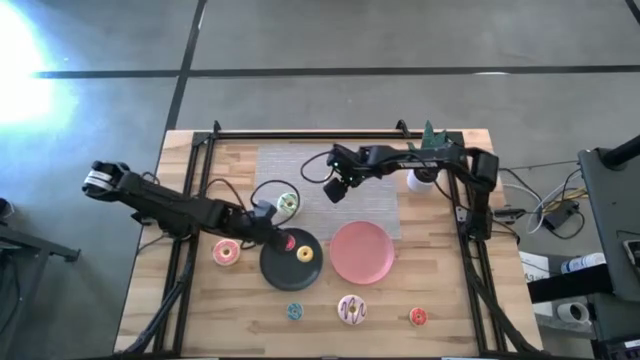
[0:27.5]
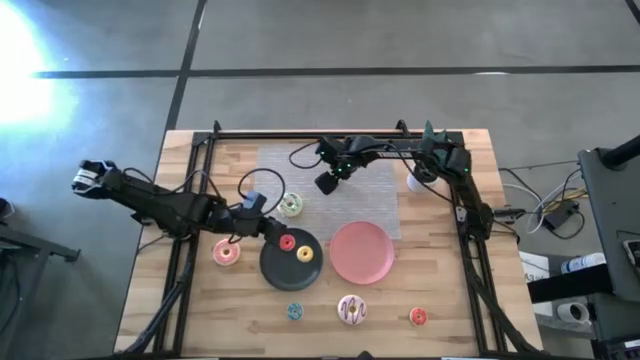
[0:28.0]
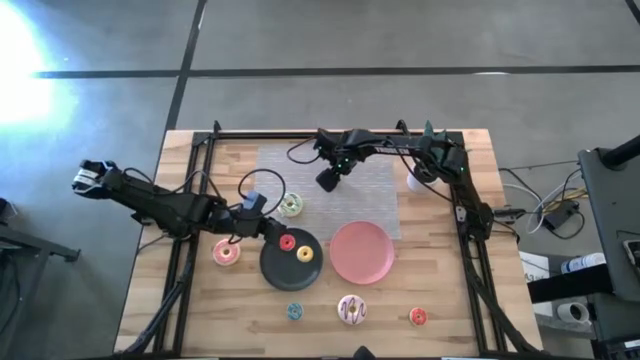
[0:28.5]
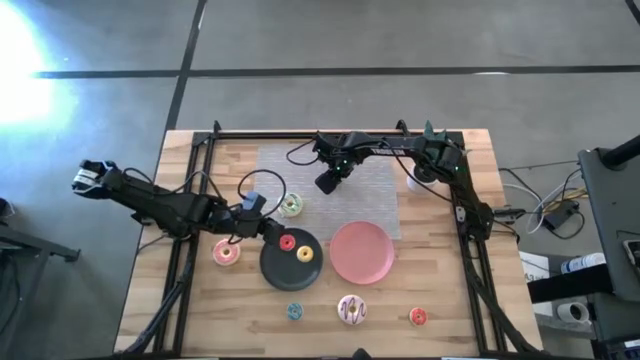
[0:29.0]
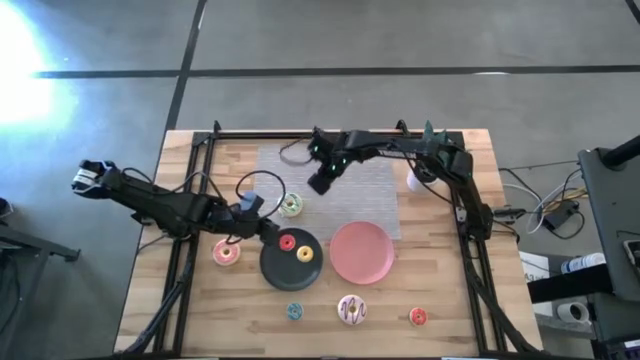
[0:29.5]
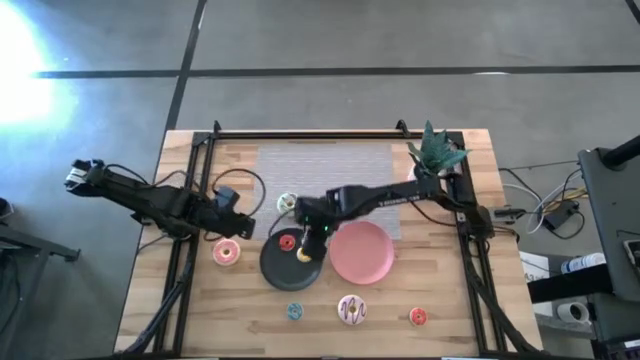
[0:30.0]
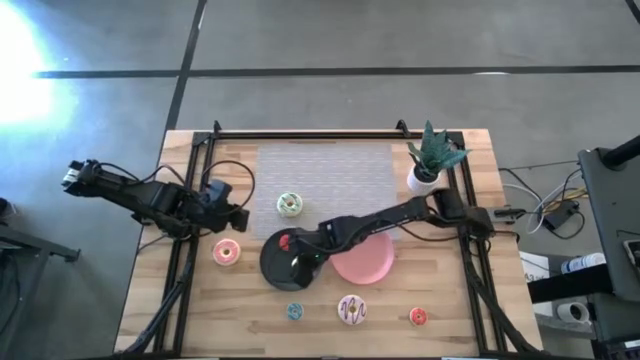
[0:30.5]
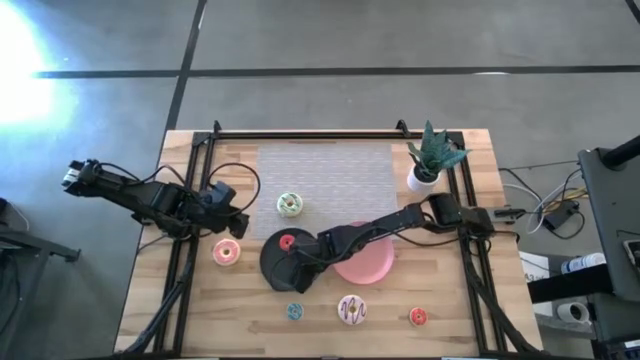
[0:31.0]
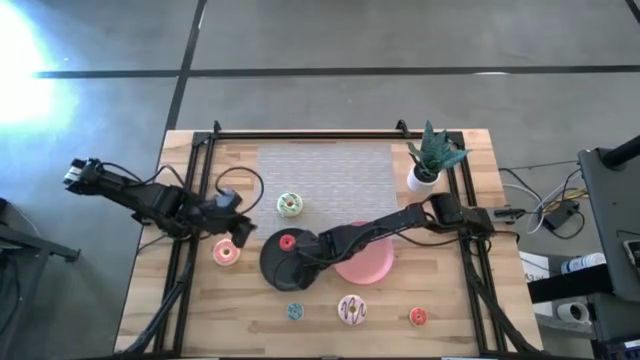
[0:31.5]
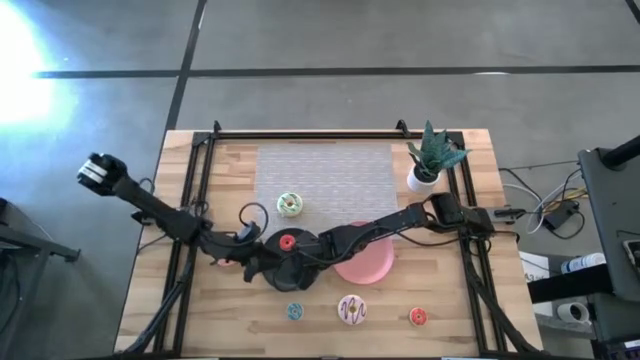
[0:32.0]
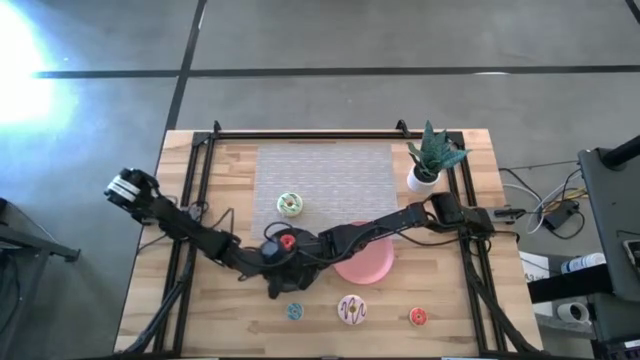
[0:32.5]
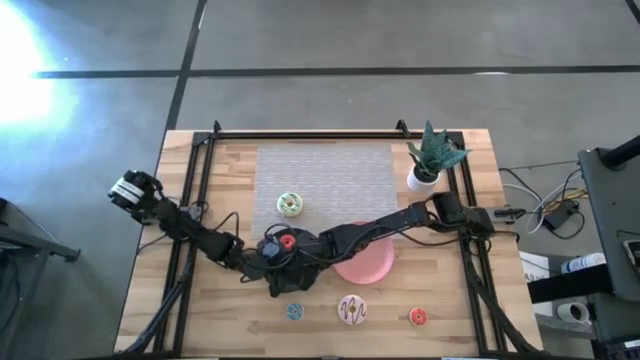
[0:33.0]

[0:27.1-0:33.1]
Task: Pick & Place donuts
Put the small white doughnut on the black plate

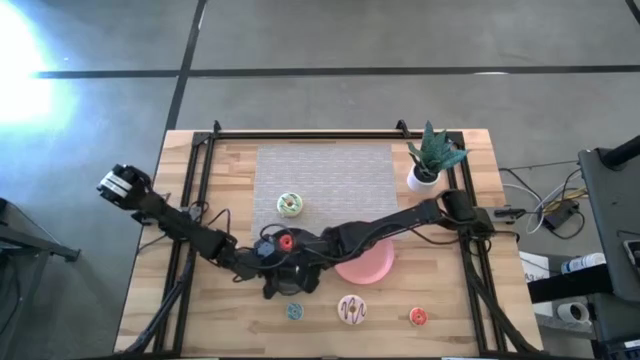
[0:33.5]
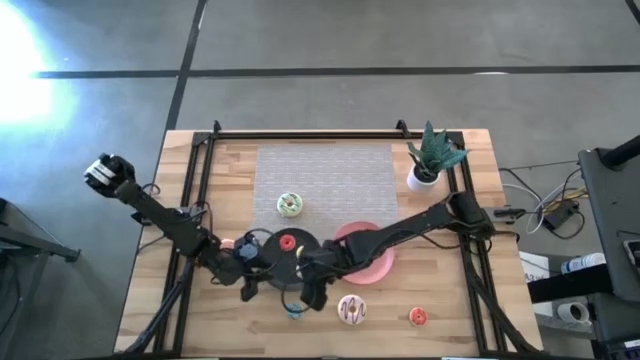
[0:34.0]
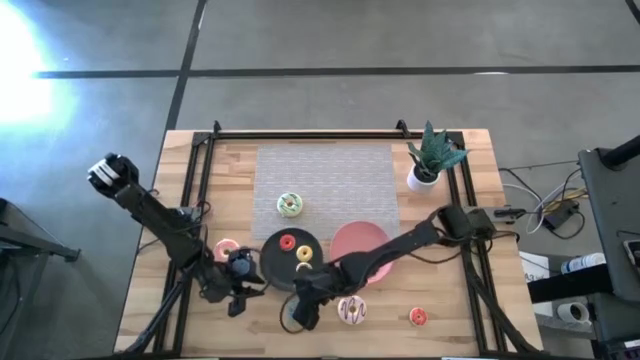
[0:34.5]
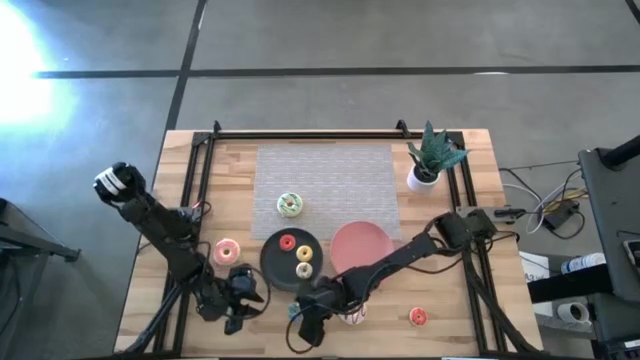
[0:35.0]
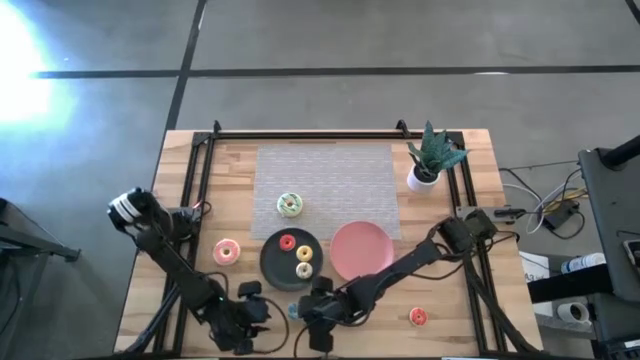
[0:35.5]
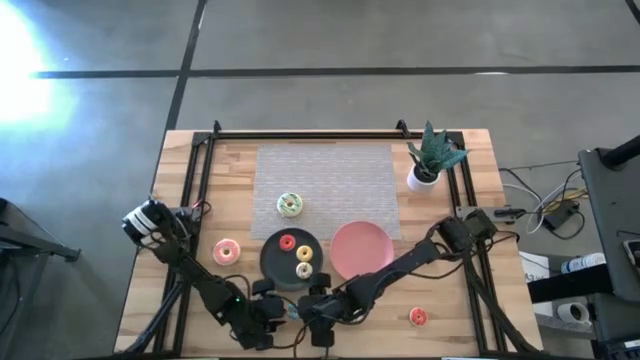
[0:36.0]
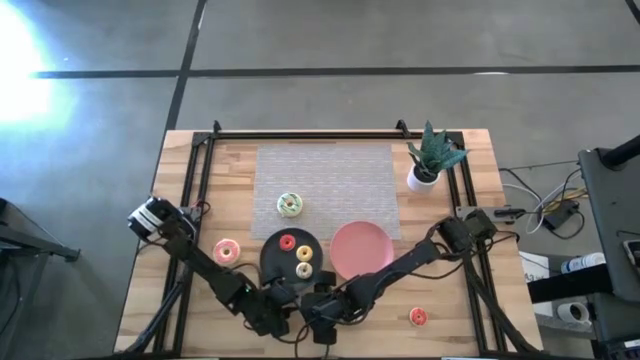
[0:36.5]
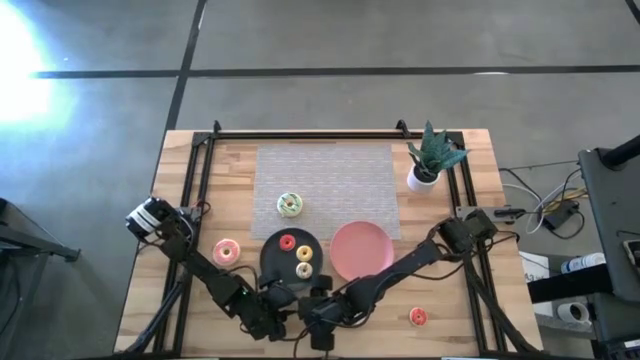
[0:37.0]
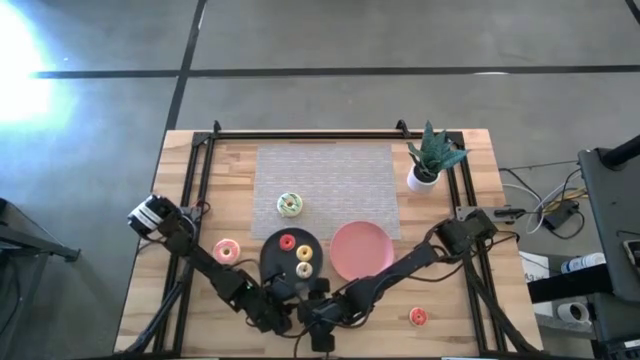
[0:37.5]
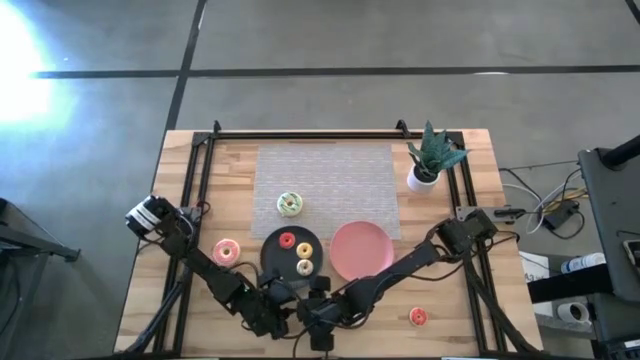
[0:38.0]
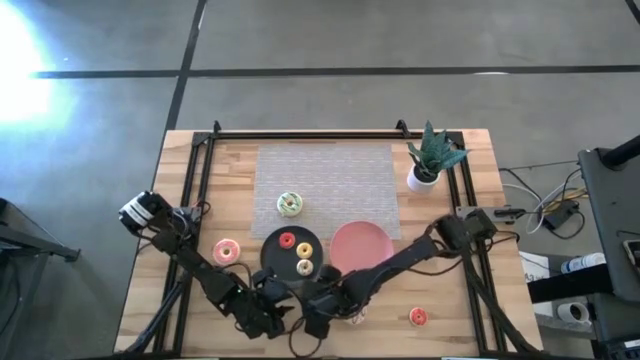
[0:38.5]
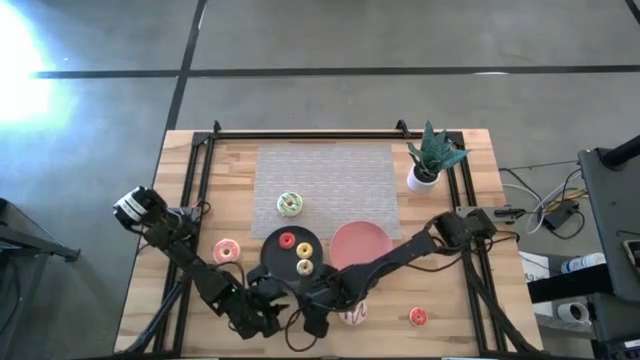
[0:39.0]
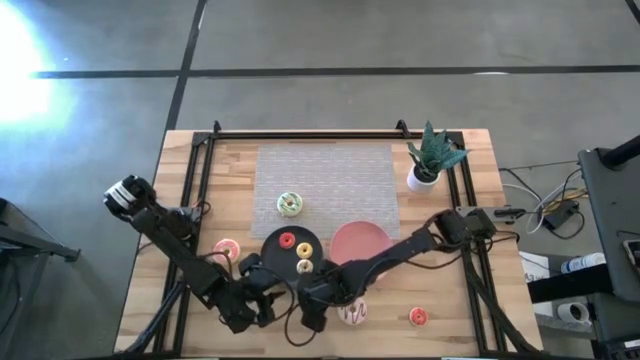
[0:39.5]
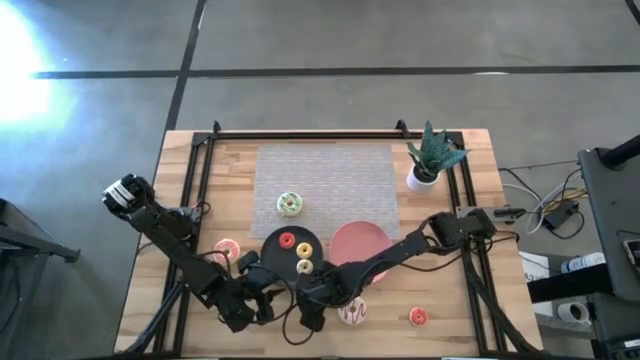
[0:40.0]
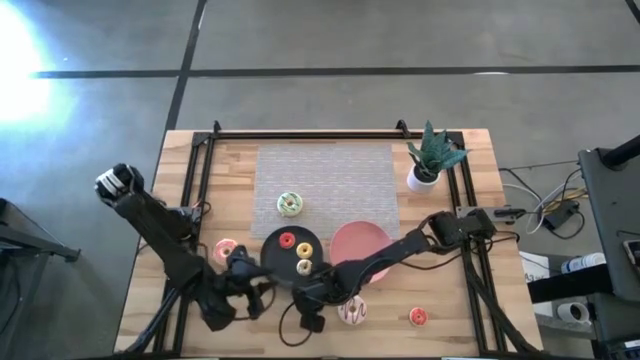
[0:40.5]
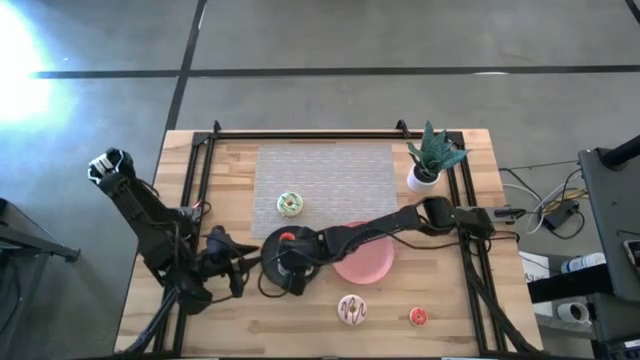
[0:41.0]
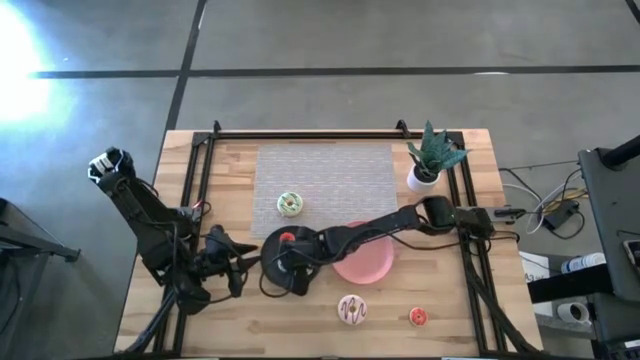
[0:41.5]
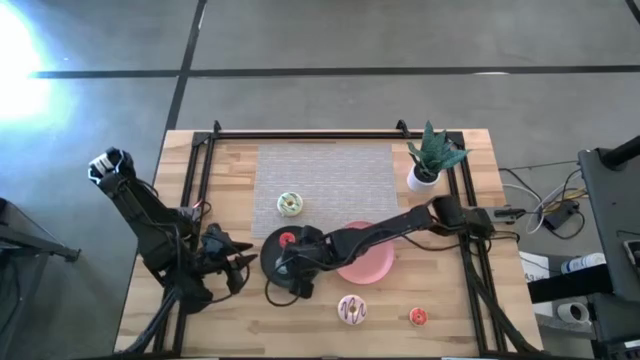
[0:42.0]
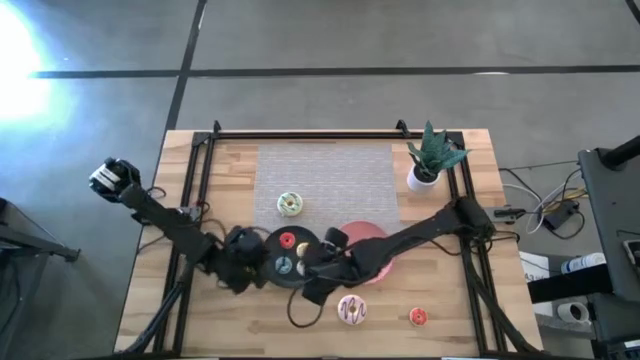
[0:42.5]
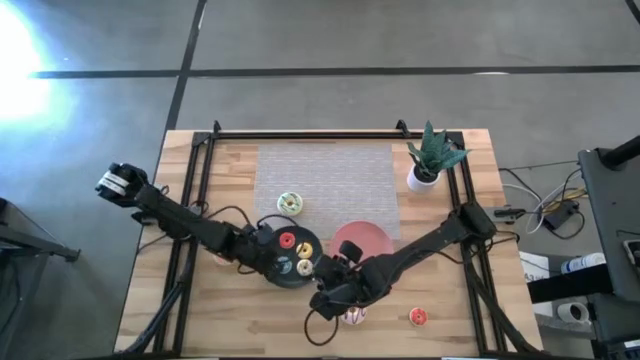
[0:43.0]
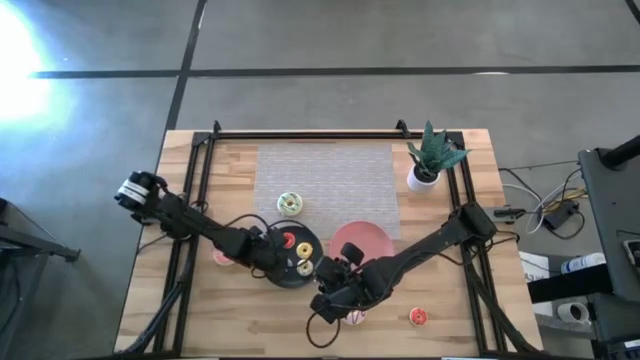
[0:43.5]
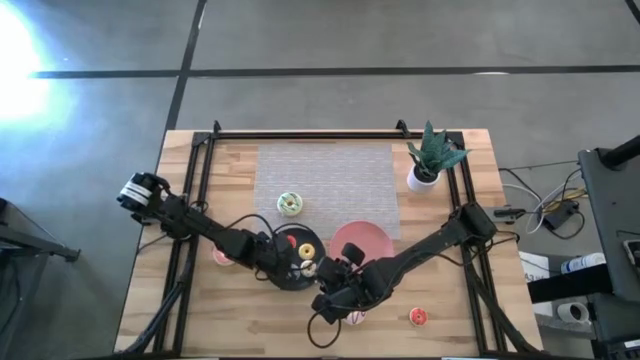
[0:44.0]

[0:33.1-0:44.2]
Put the small blue doughnut on the black plate

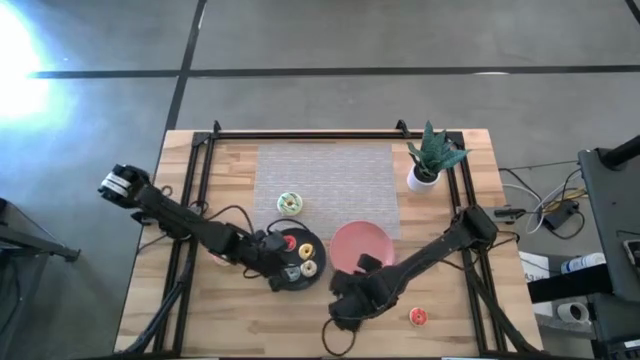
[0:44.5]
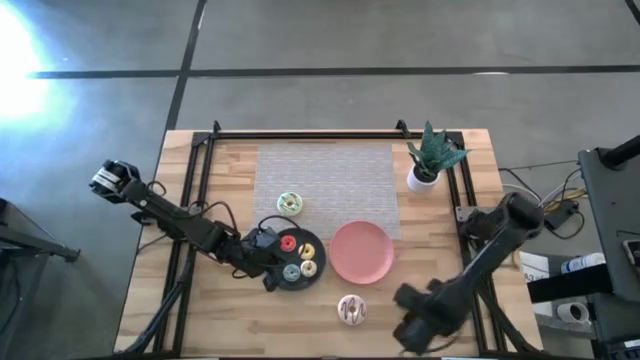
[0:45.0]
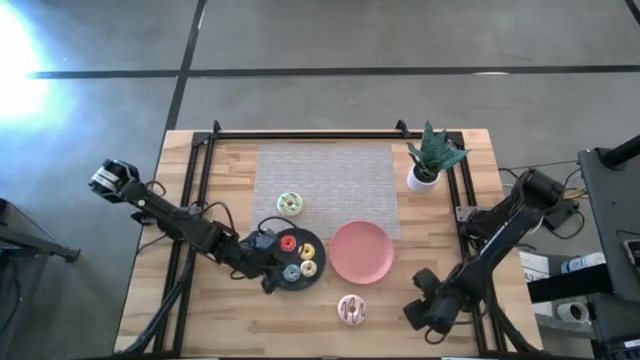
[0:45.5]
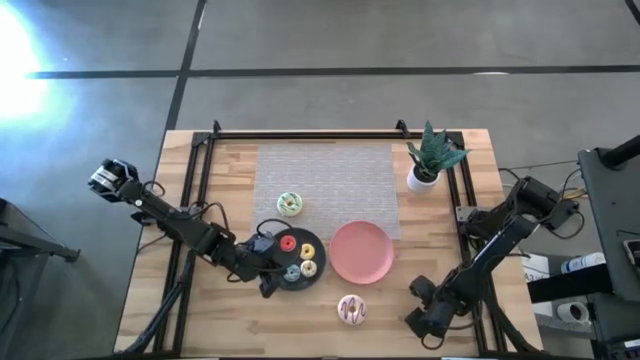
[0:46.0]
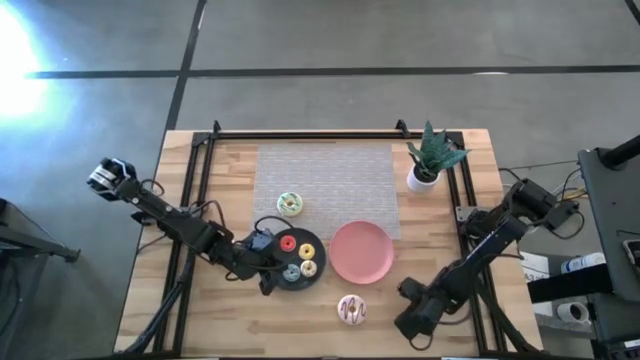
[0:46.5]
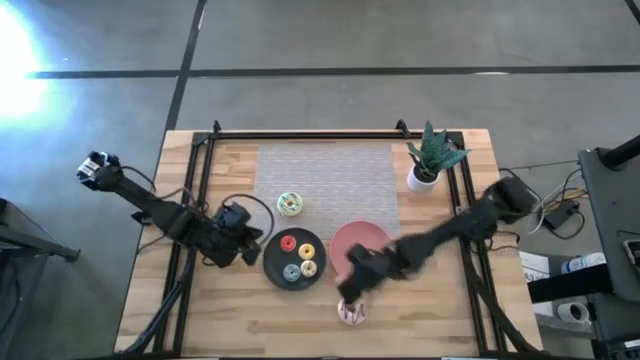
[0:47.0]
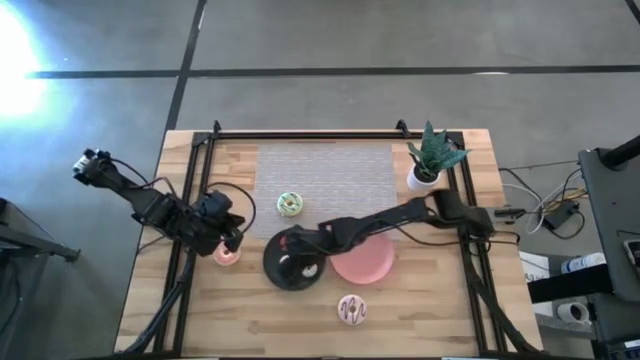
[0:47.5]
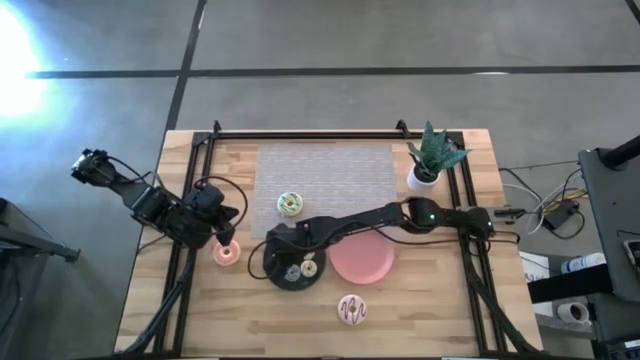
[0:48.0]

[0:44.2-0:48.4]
Put the small orange doughnut on the black plate

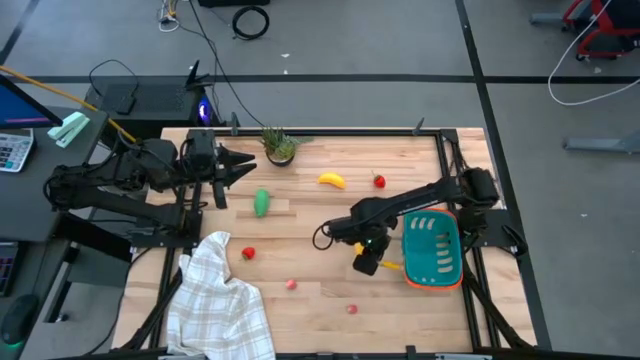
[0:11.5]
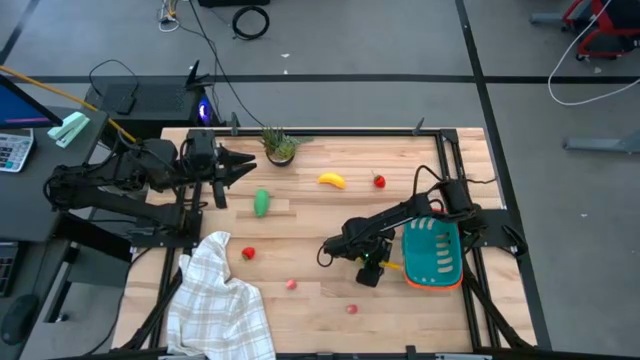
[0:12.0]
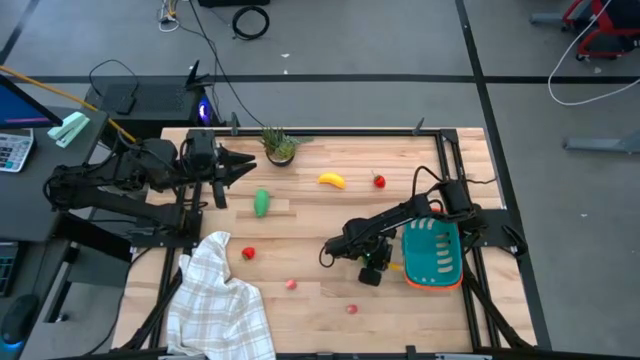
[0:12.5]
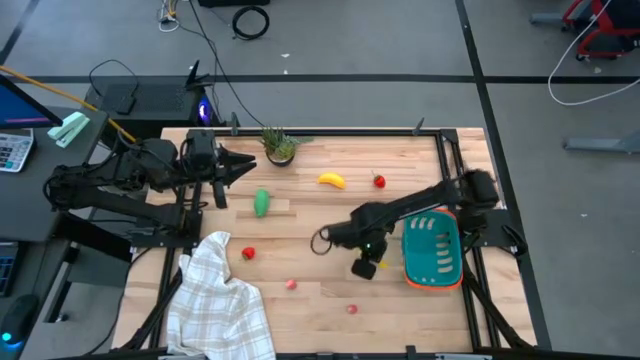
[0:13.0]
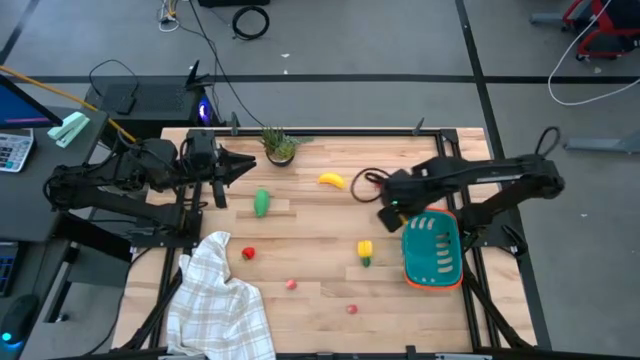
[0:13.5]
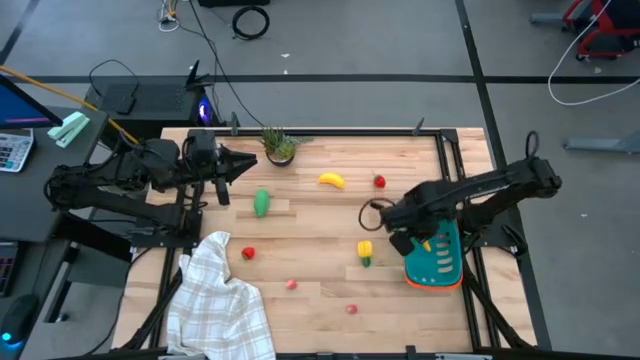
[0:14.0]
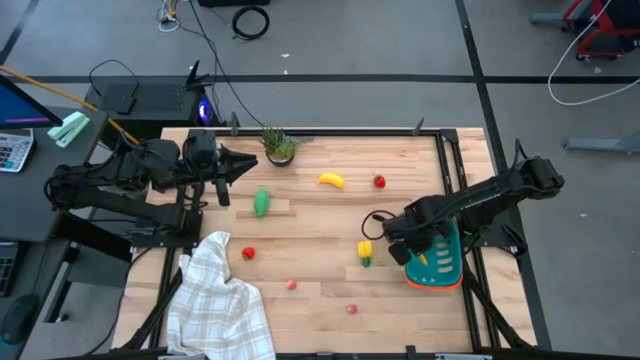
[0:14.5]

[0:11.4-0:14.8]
Task: Pick and placing Produce into tupperware
Put the yellow corn into the blue basket
